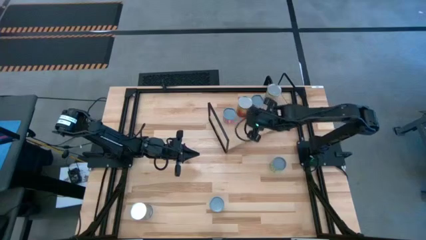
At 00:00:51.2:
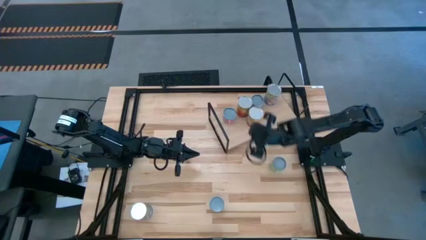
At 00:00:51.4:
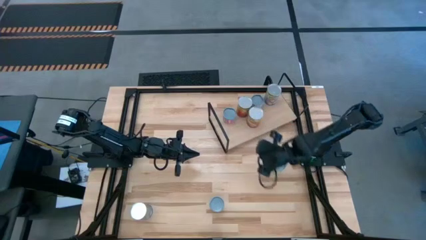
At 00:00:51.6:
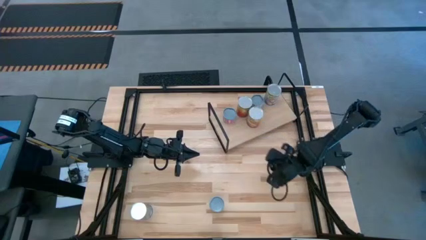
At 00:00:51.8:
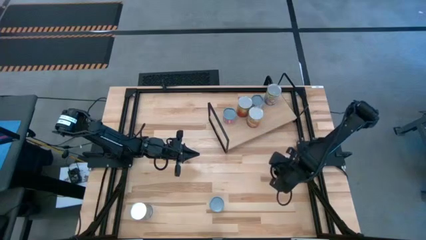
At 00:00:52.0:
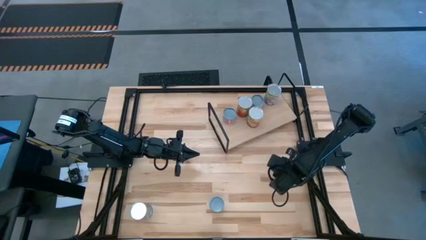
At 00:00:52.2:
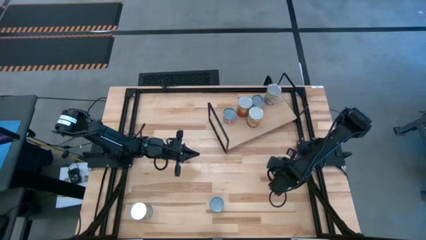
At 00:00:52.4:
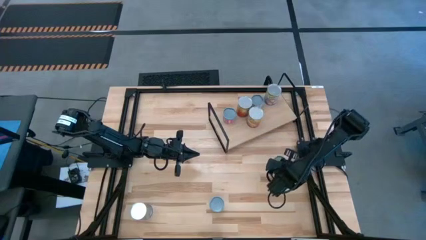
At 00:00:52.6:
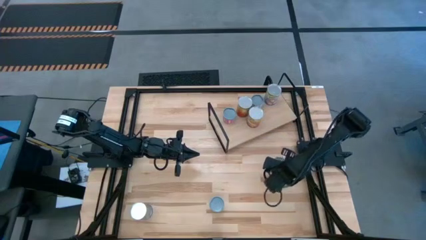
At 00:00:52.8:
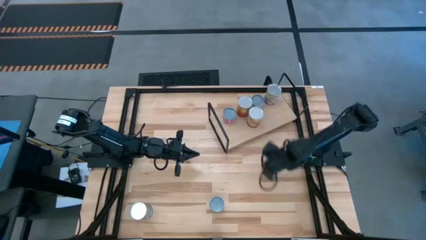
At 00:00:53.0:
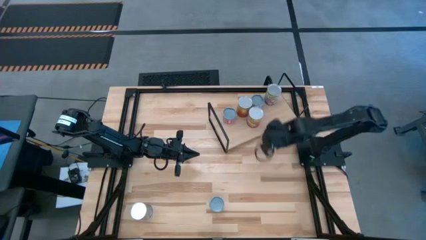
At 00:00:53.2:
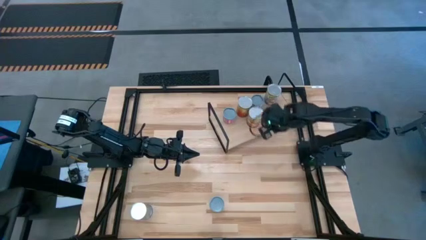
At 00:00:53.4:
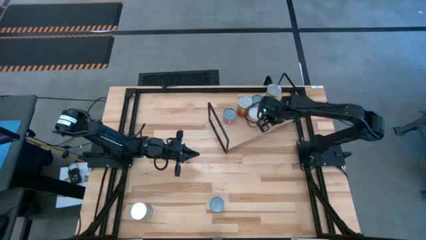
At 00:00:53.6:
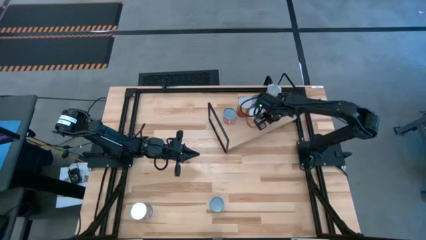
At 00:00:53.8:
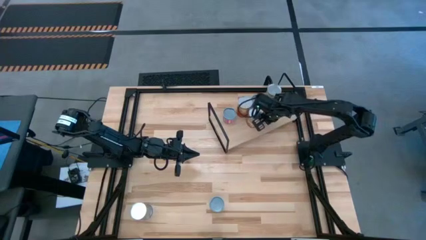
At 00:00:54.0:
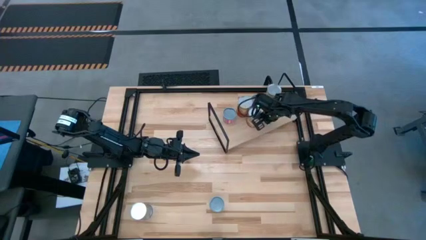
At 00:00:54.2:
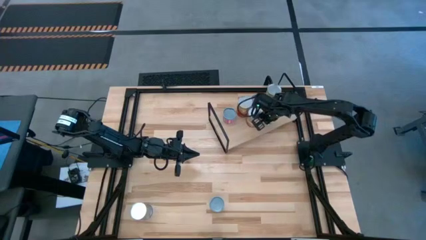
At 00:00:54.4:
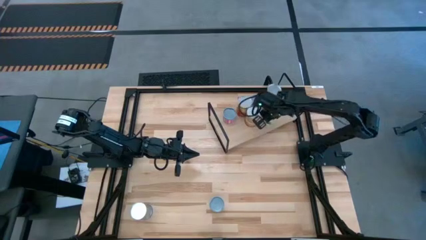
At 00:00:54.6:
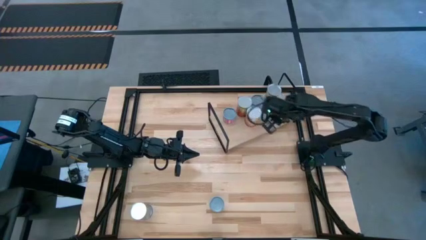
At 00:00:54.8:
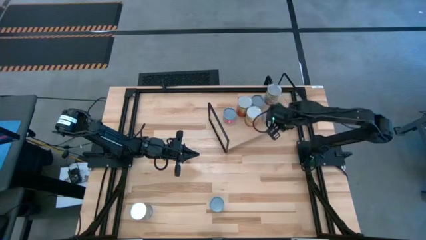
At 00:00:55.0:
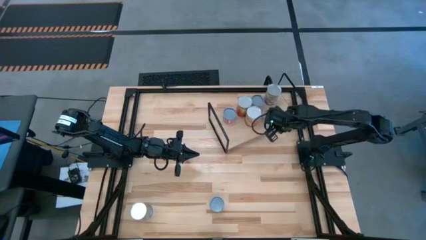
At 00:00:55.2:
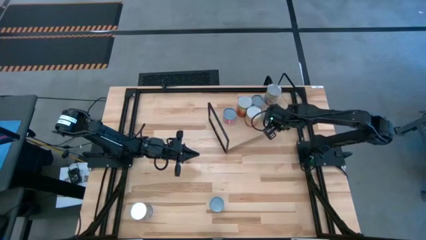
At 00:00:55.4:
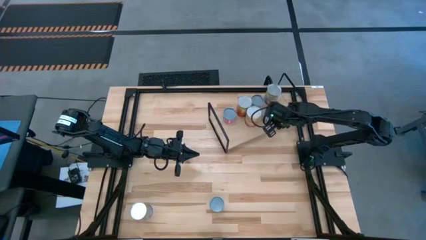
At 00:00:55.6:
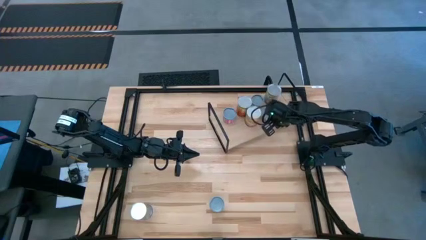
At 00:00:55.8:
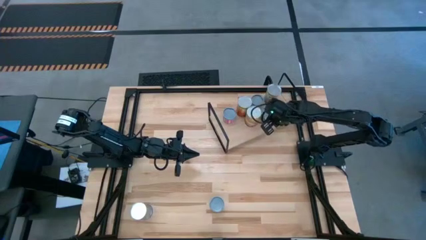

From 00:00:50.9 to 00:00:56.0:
Task: Pick and place cans onto a shelf
Put the canned green peas on the shelf

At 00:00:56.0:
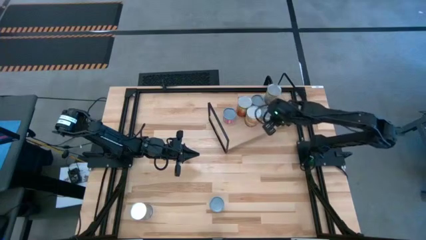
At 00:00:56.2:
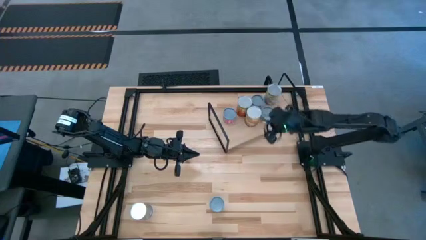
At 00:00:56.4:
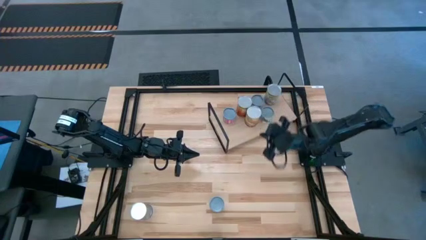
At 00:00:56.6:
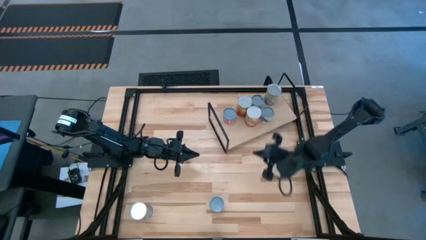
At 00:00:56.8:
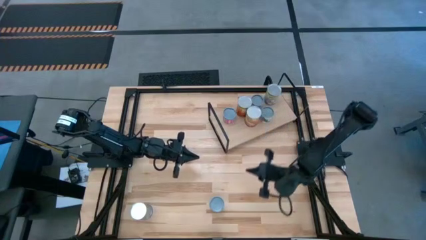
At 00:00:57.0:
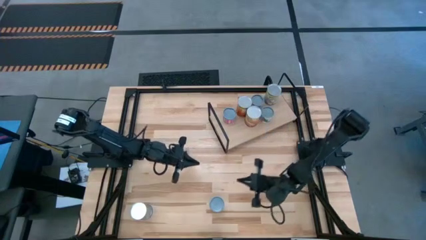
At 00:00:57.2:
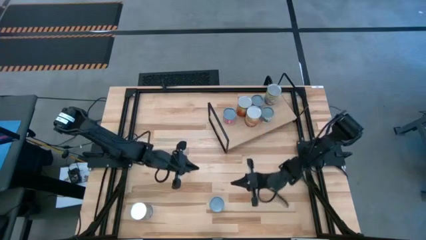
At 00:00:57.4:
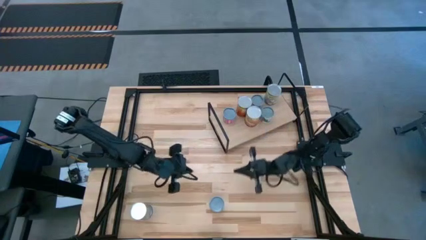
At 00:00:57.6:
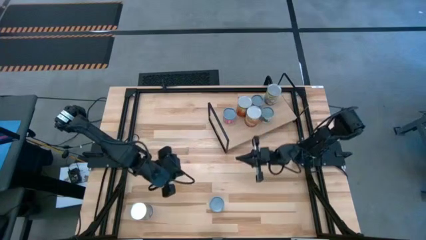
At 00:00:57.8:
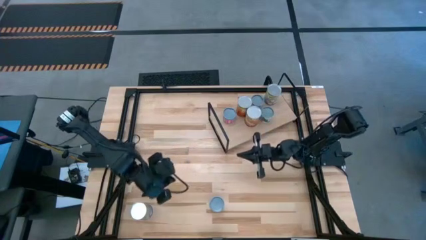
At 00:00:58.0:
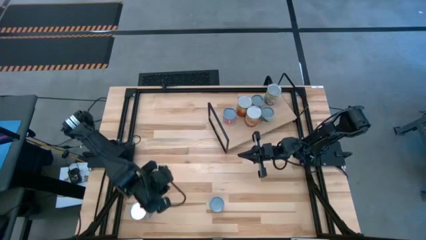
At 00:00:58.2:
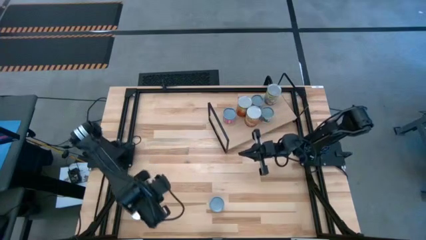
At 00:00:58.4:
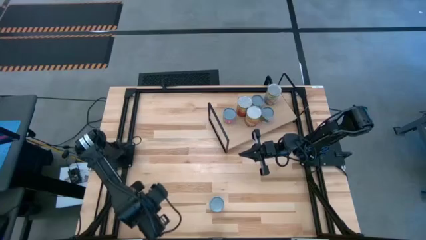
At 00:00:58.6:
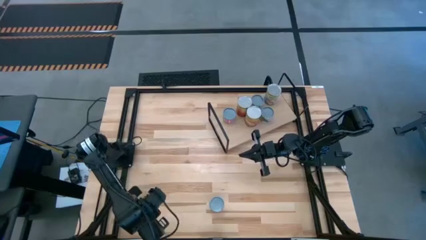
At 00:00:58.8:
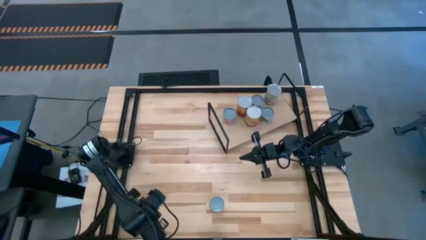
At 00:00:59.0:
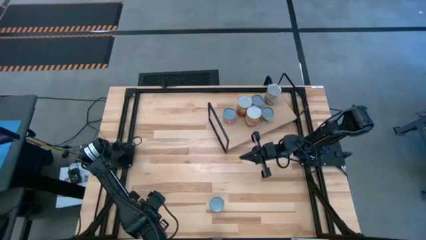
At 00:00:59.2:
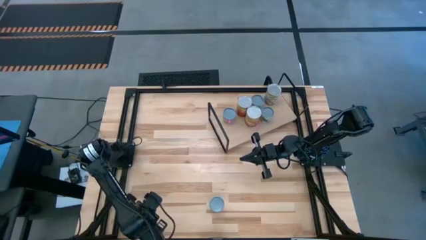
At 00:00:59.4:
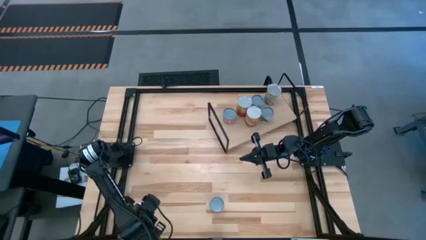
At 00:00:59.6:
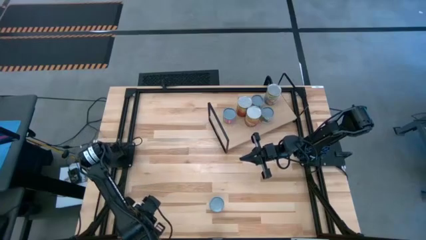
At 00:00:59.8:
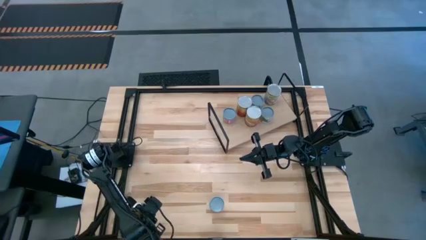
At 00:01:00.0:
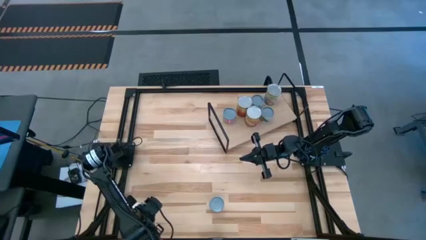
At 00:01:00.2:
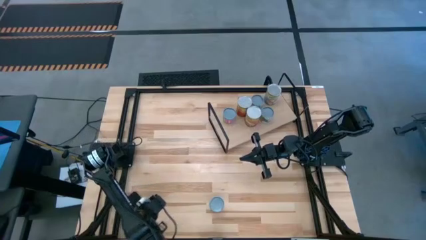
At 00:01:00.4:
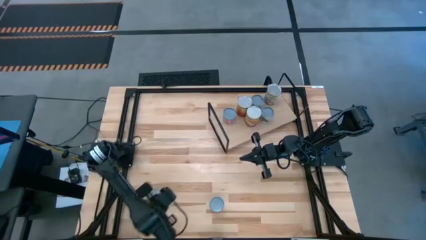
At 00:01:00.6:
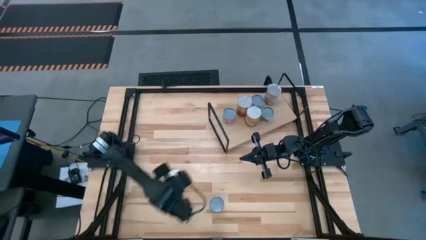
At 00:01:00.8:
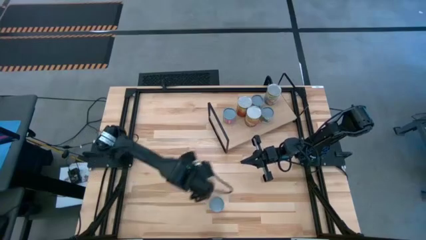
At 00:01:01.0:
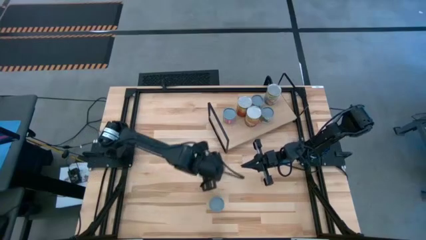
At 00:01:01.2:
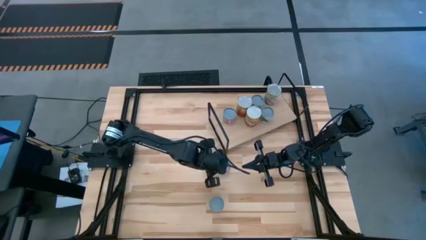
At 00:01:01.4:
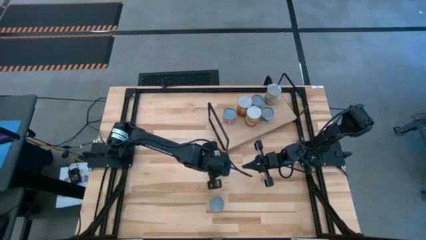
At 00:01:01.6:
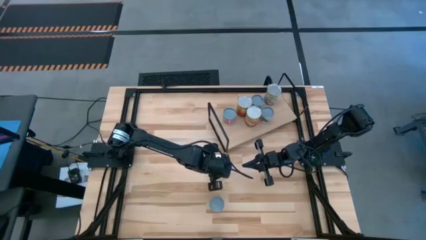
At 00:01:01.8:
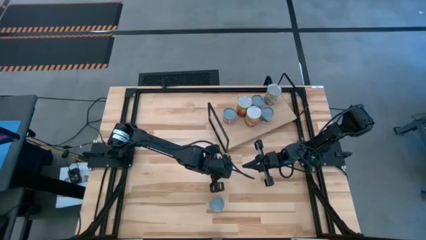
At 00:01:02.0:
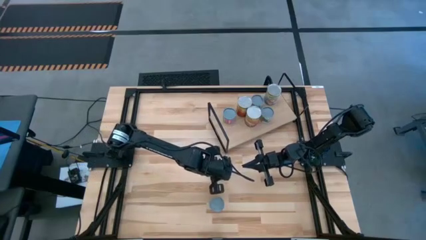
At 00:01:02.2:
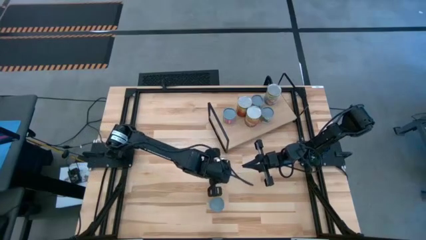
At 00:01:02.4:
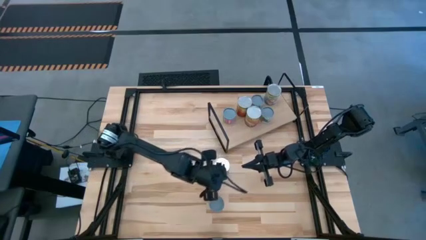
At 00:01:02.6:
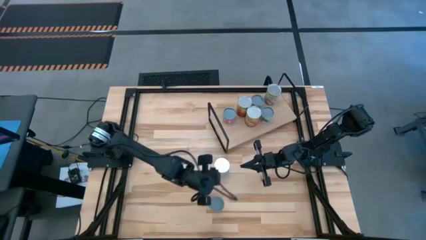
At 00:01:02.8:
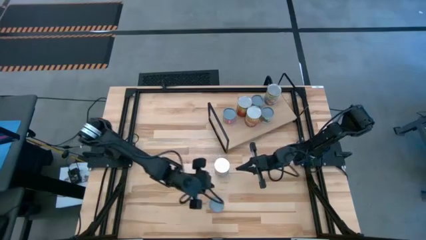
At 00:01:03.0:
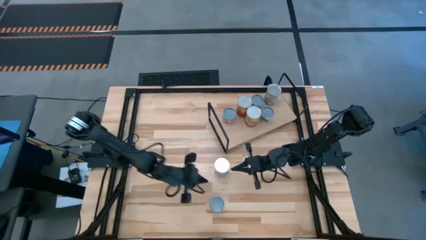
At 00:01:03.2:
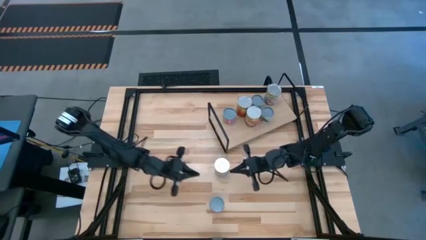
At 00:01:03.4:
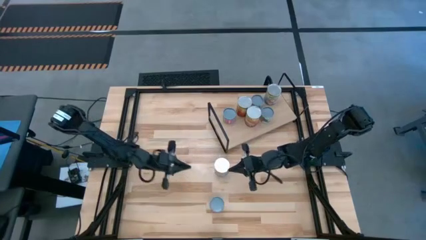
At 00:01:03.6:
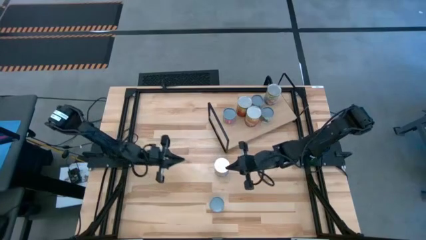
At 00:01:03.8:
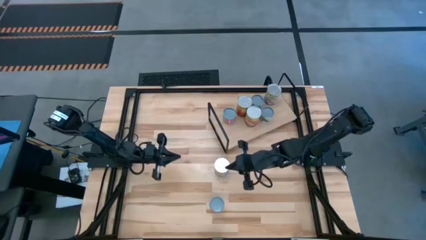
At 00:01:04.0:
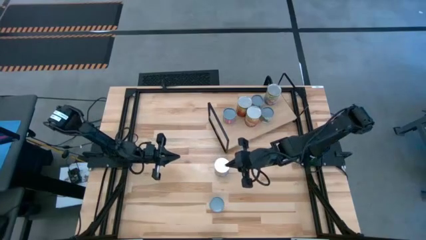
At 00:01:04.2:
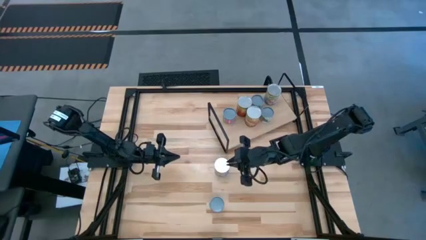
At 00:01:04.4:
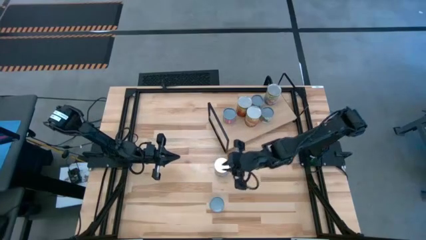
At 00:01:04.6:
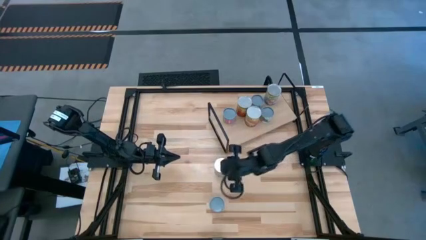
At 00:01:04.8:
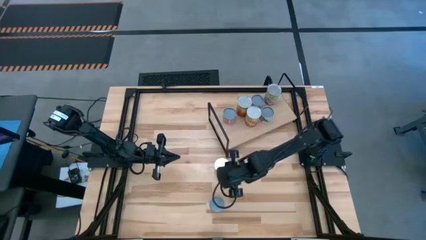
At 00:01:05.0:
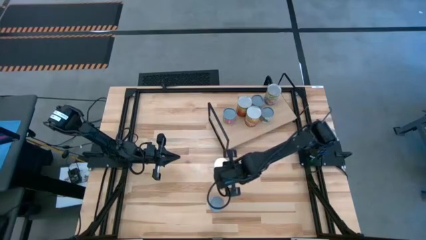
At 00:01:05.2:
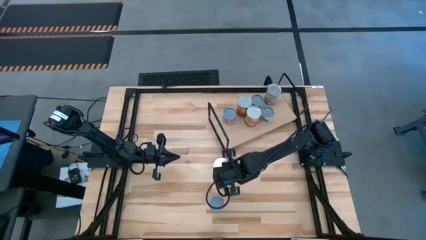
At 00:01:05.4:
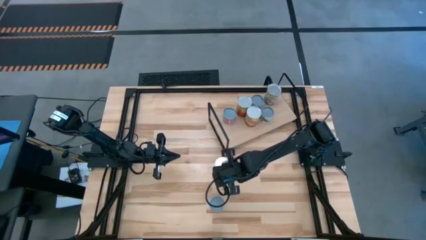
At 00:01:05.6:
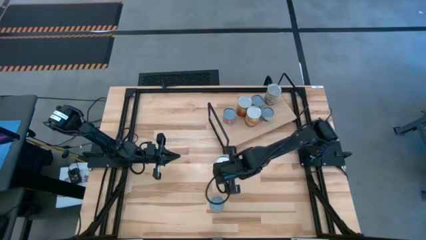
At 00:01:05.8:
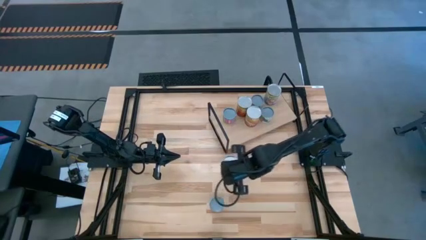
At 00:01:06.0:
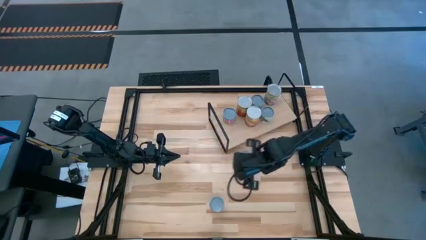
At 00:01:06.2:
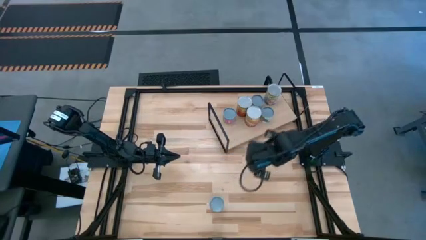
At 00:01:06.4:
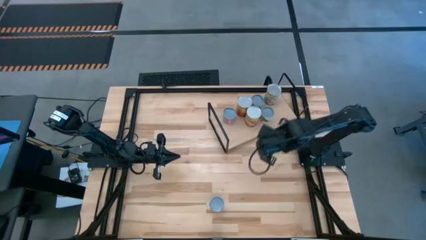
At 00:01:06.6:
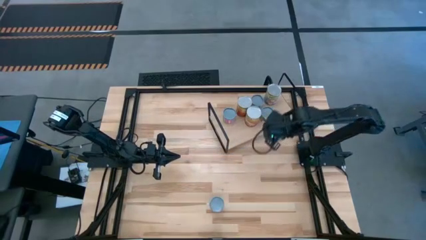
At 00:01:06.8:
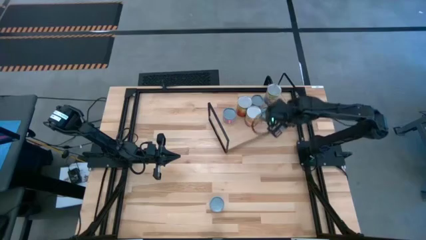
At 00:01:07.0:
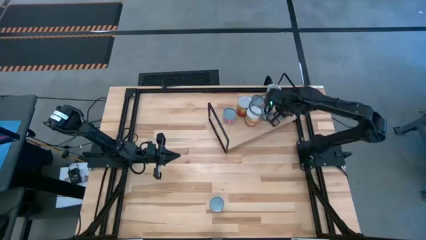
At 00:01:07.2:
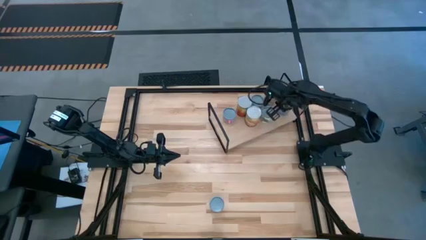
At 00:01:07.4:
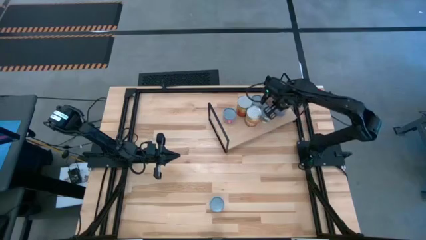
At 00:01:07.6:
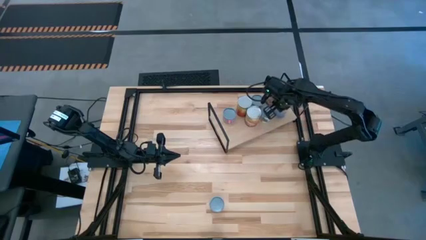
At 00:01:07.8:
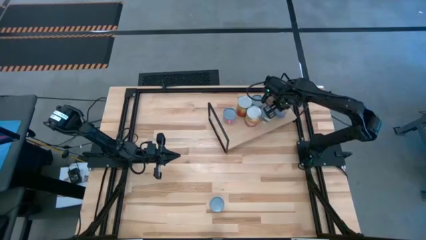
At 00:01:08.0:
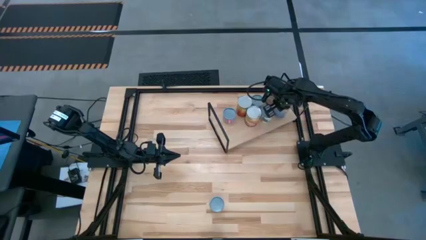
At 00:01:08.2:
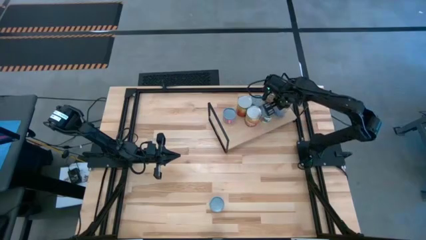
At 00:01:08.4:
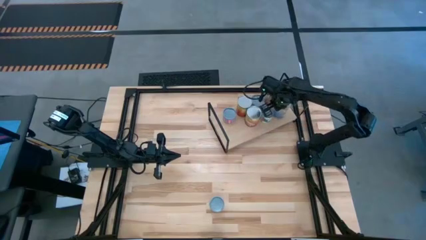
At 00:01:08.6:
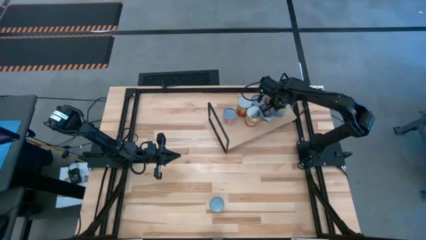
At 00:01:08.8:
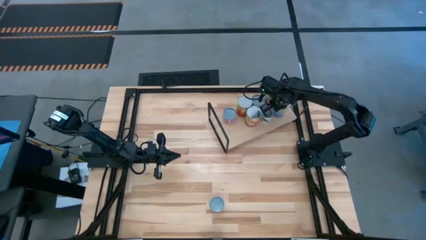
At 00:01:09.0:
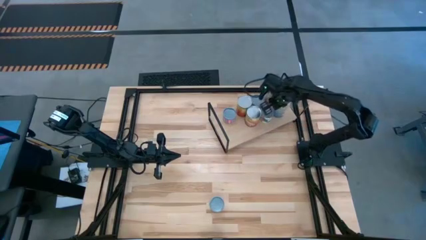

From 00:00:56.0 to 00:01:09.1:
Put the canned peaches on the shelf
